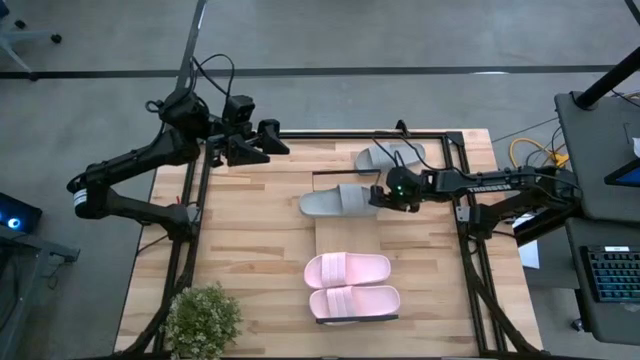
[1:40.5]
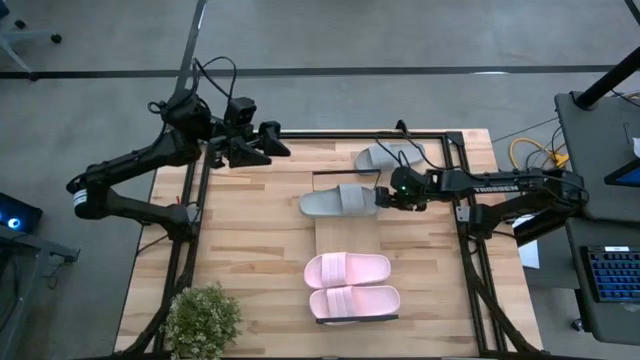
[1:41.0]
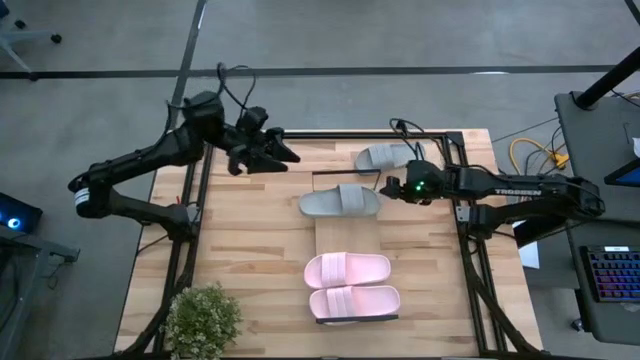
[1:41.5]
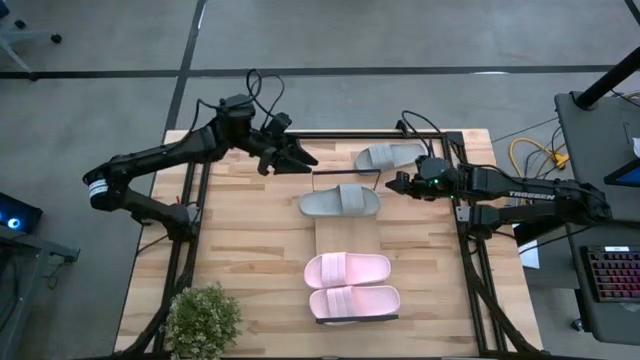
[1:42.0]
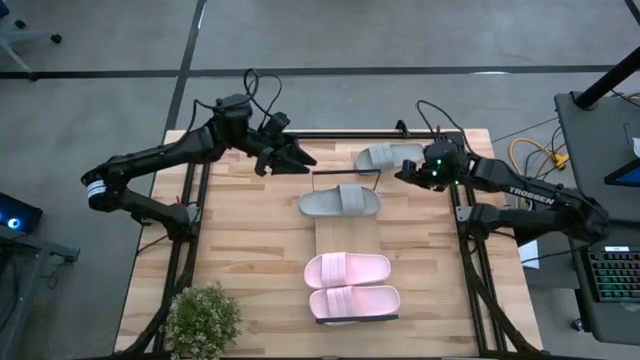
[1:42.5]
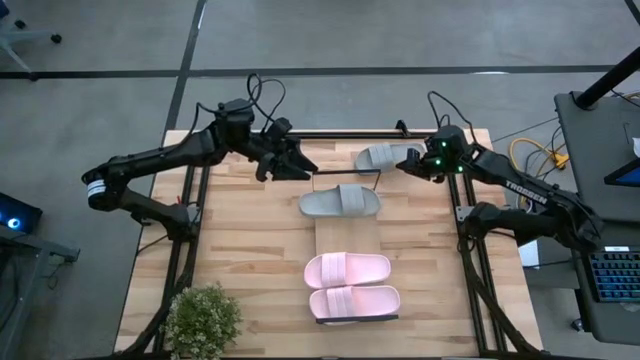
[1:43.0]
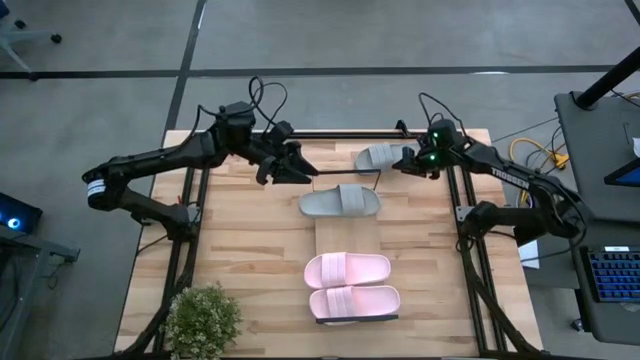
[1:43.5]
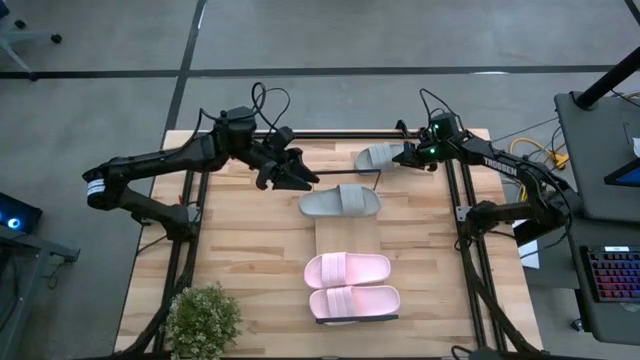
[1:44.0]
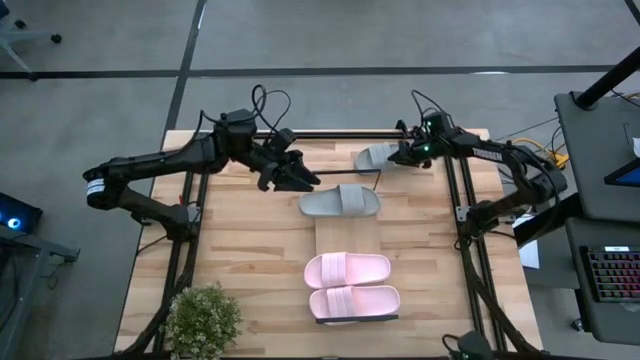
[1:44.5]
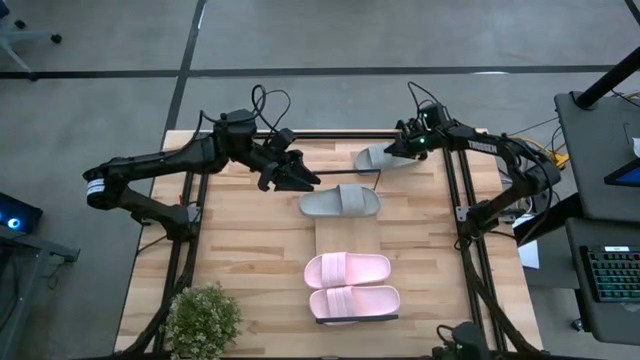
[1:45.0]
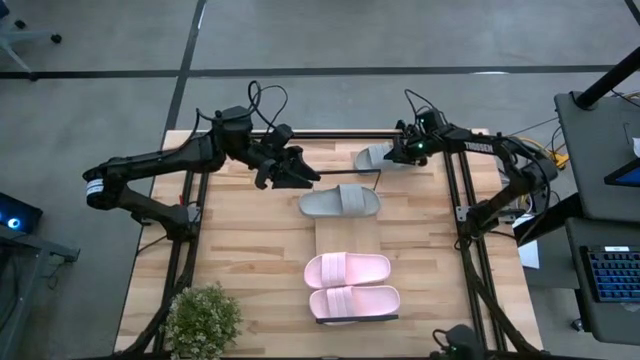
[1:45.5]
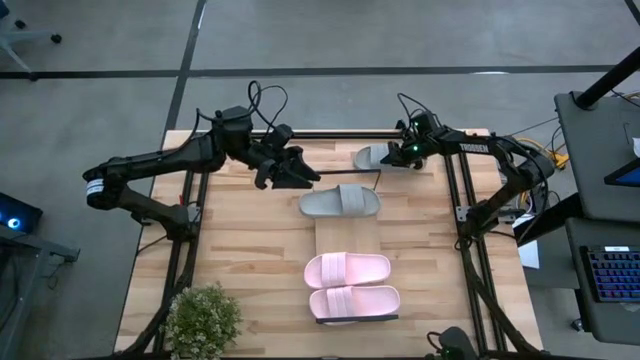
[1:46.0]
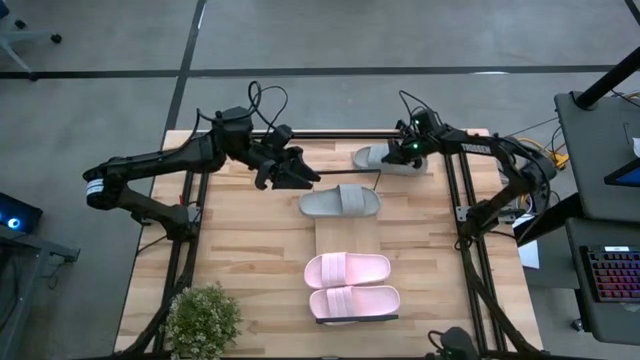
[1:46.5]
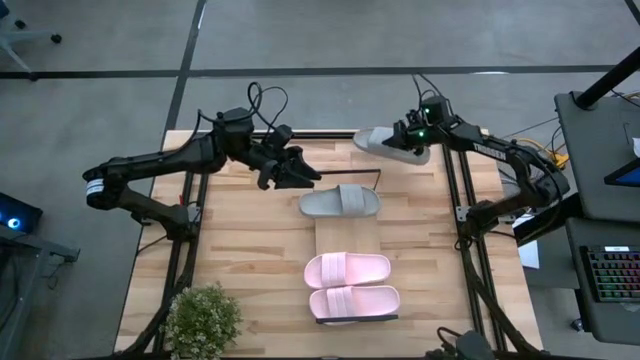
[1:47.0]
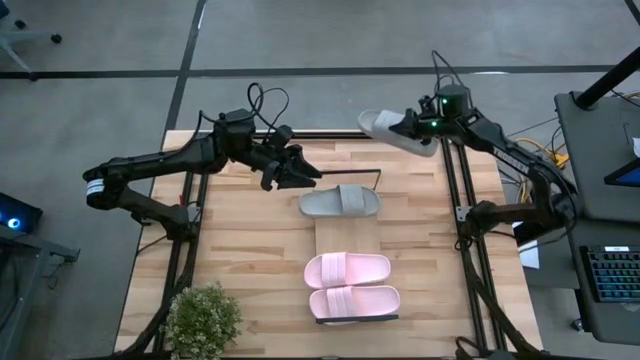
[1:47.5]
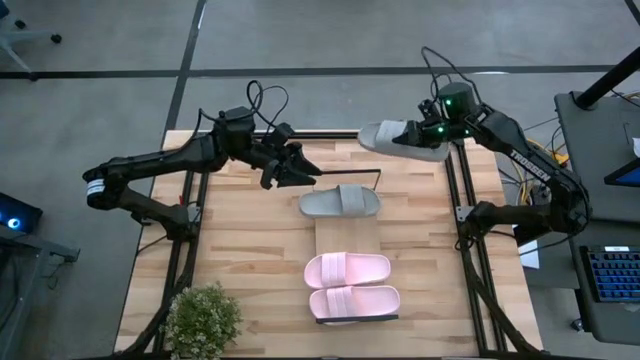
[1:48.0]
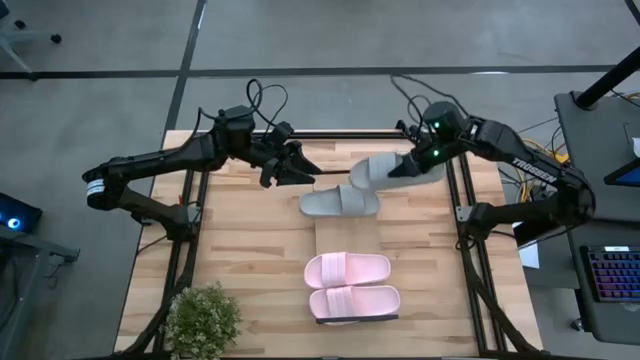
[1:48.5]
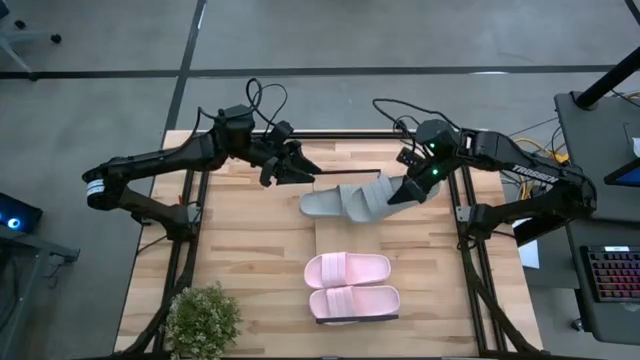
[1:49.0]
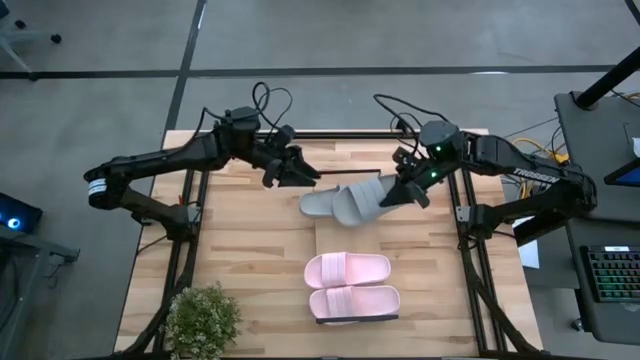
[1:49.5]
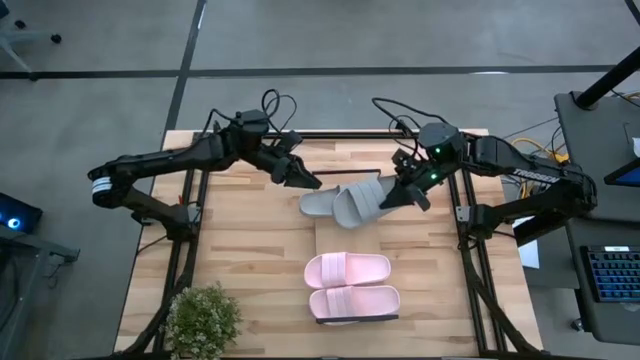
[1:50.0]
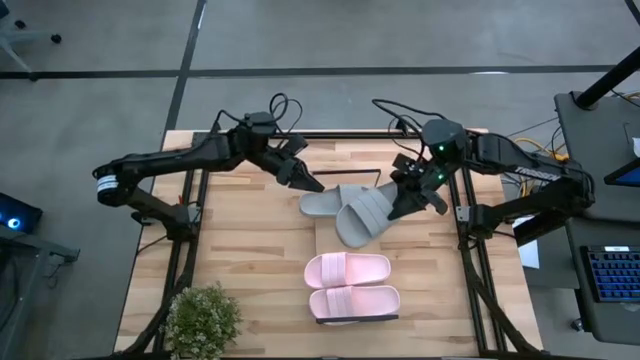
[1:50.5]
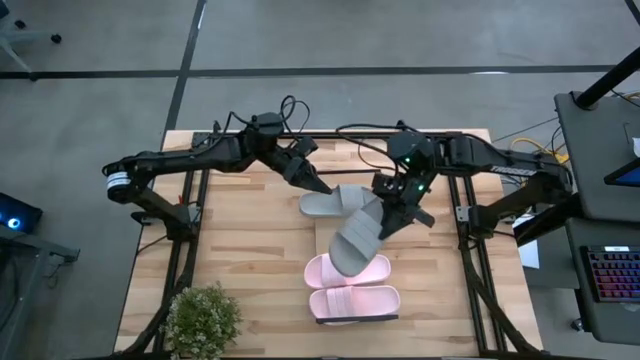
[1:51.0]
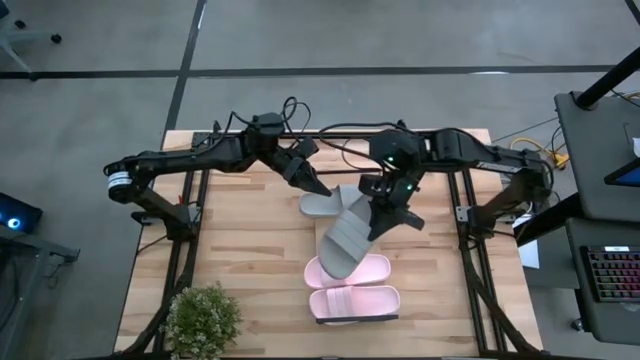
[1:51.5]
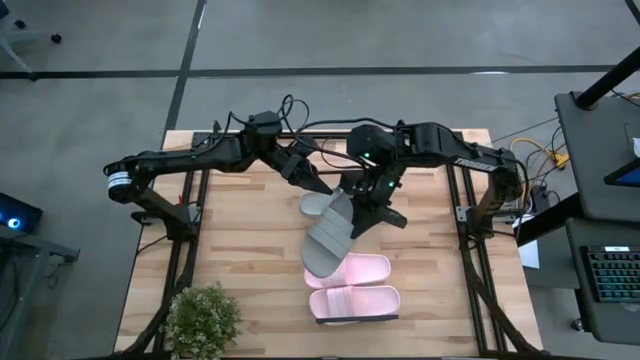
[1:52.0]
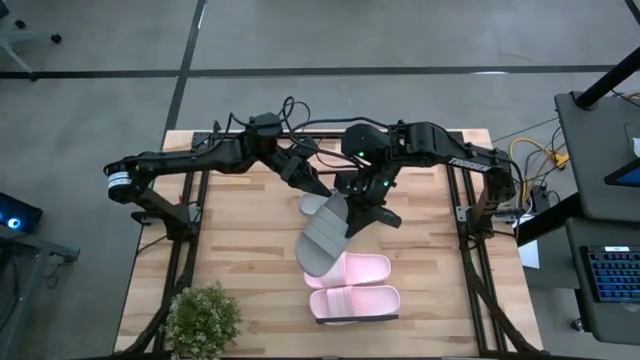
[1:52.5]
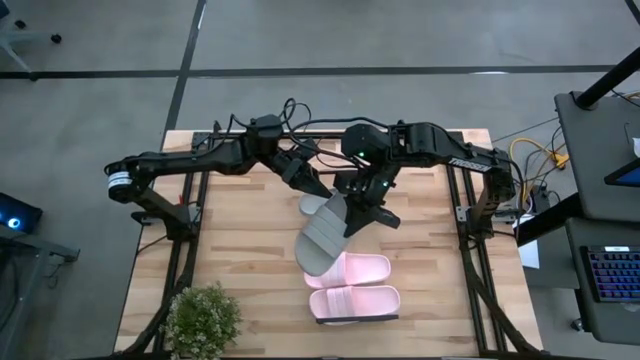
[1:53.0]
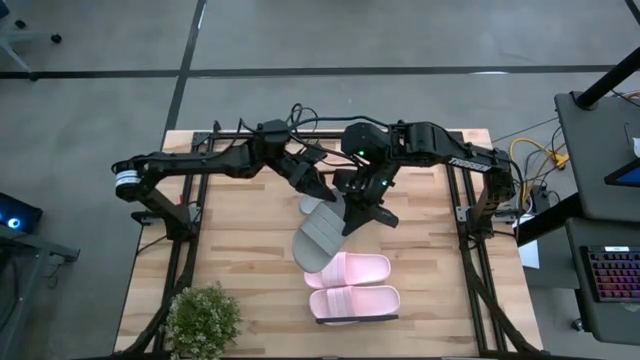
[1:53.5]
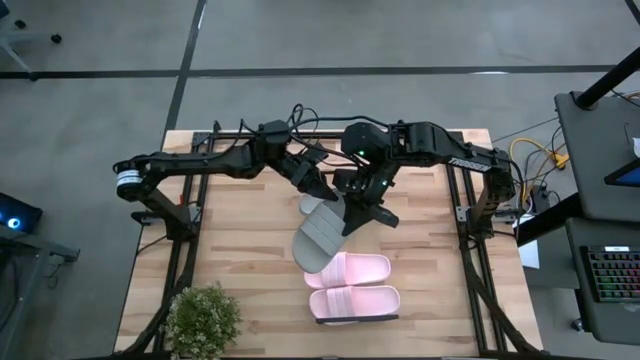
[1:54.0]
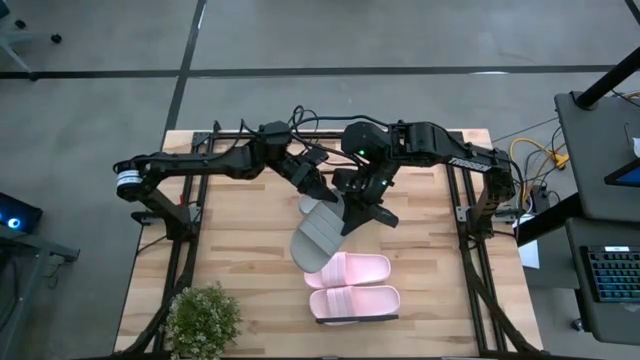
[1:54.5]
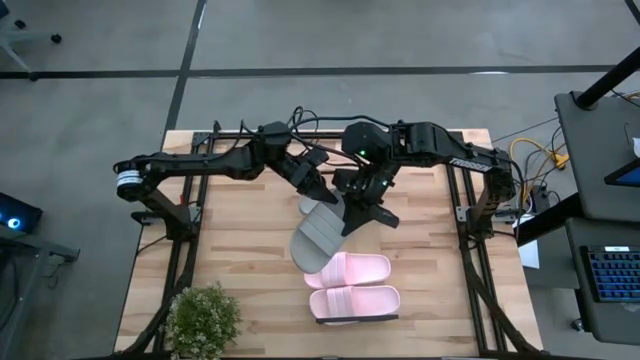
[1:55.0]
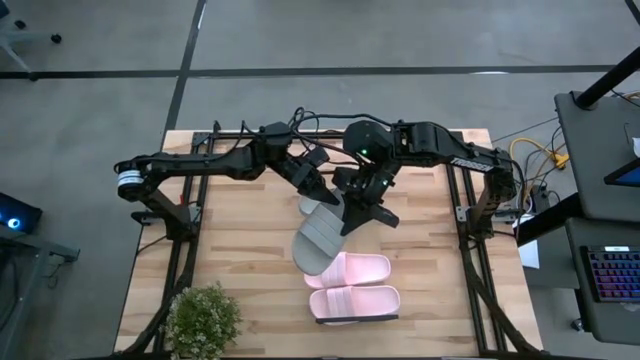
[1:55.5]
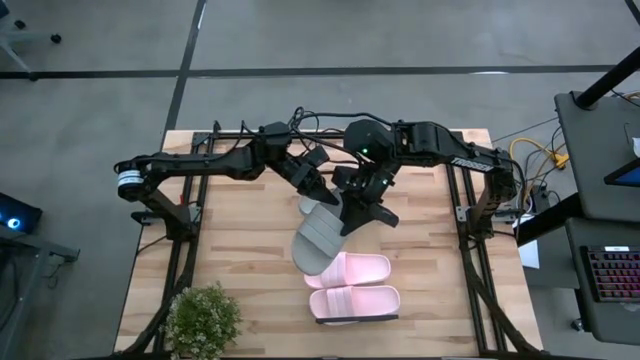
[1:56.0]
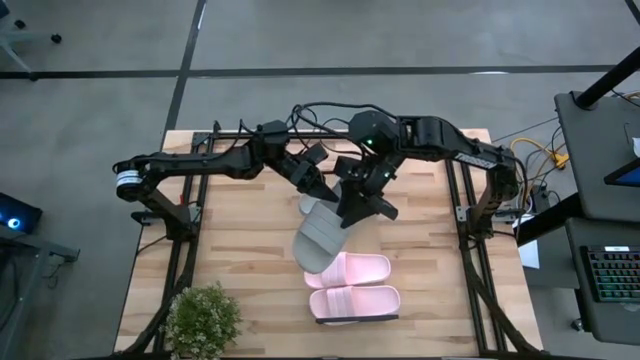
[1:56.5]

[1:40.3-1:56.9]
Task: Pick and place slides into the shelf
Put the gray slide on the shelf

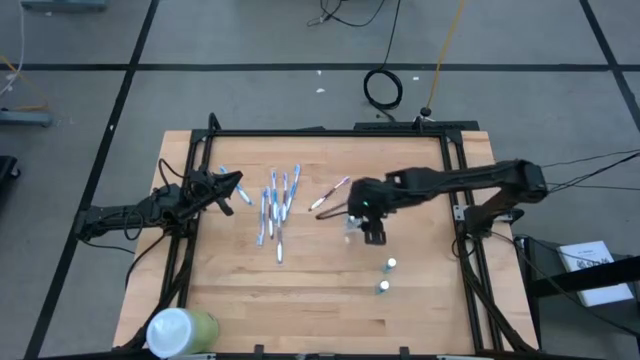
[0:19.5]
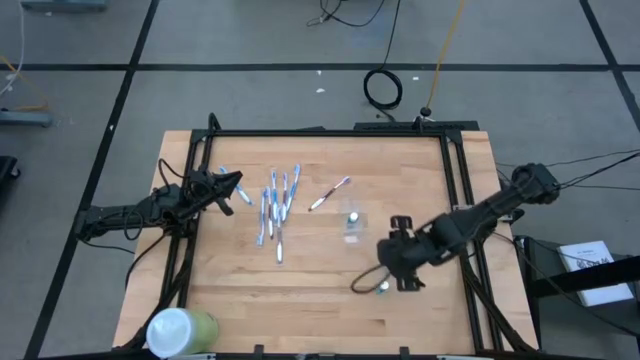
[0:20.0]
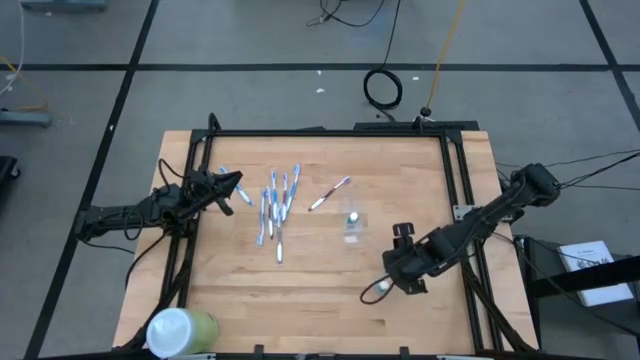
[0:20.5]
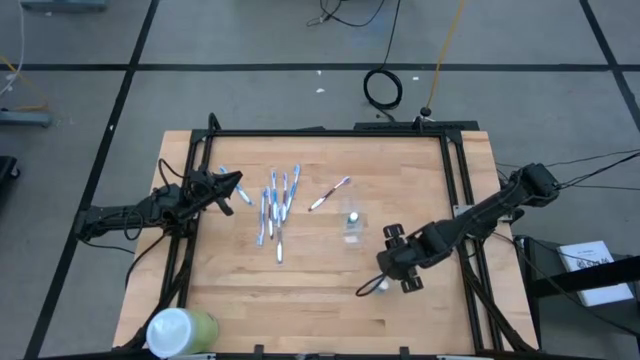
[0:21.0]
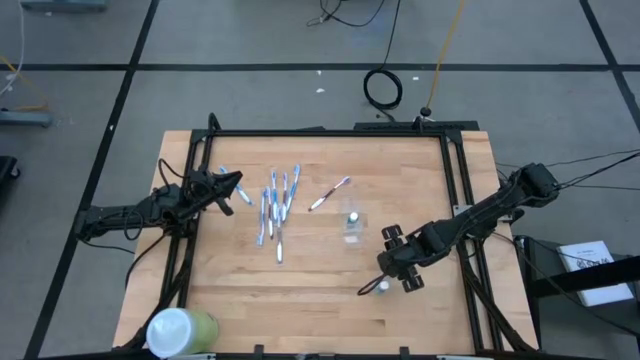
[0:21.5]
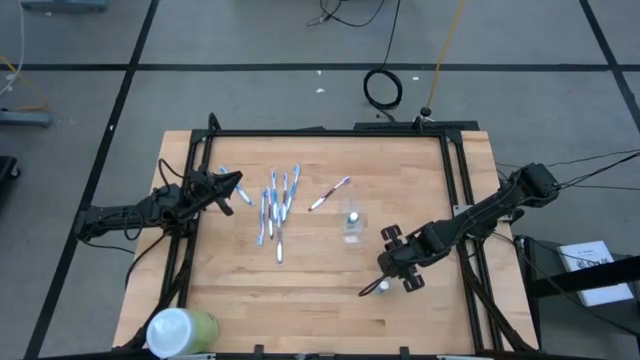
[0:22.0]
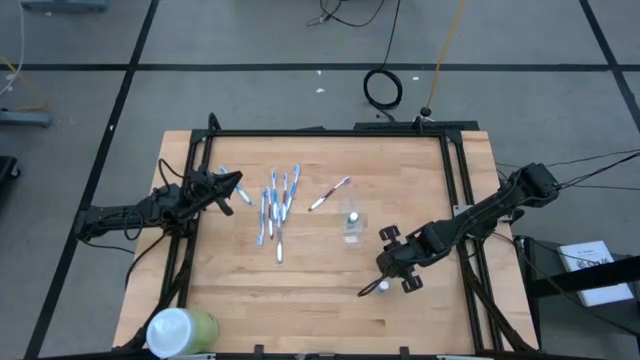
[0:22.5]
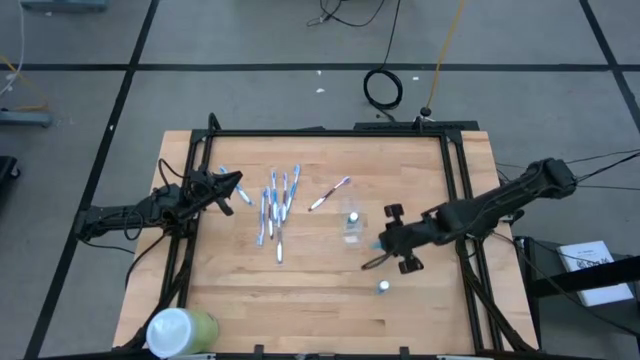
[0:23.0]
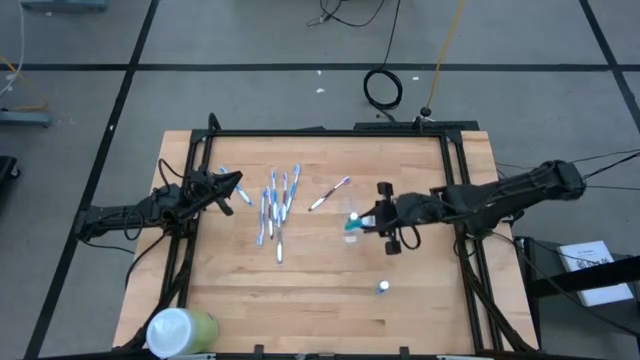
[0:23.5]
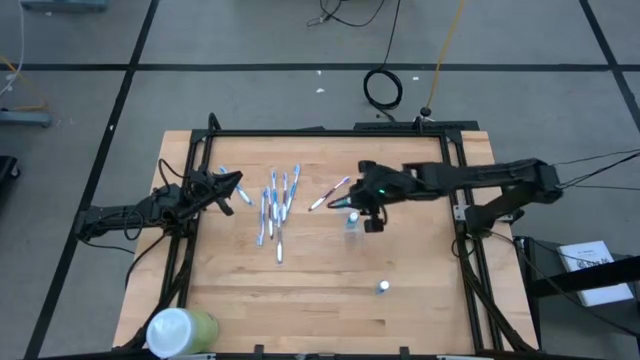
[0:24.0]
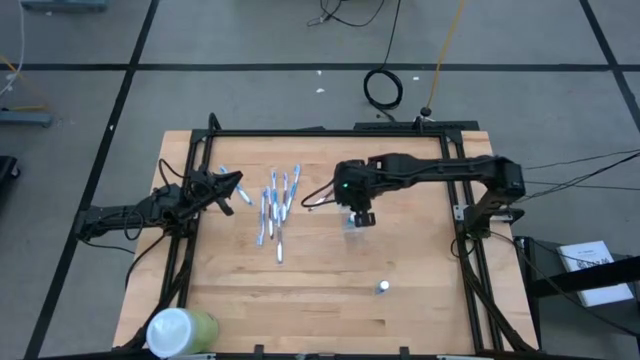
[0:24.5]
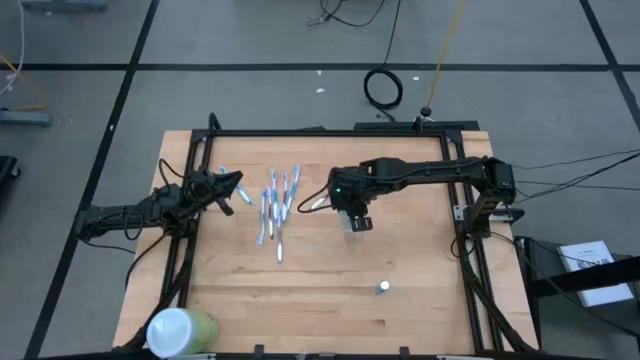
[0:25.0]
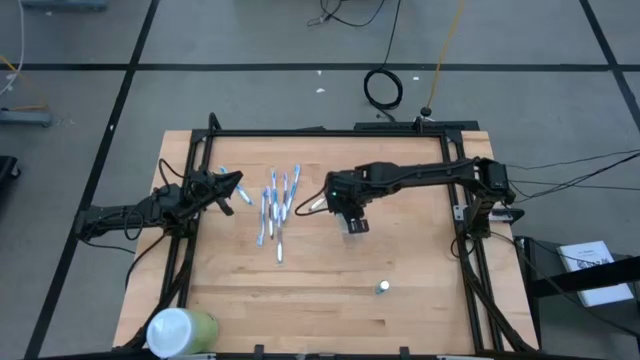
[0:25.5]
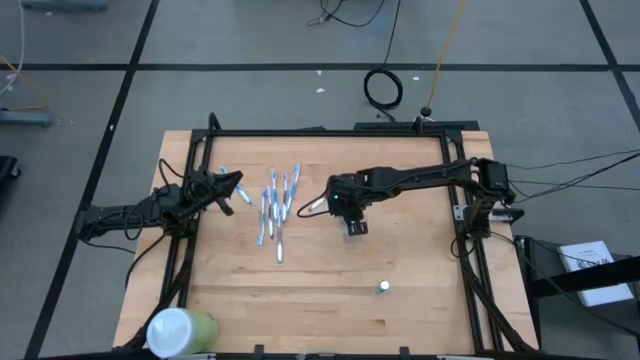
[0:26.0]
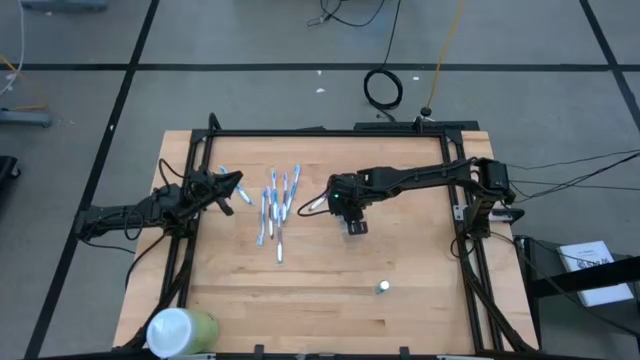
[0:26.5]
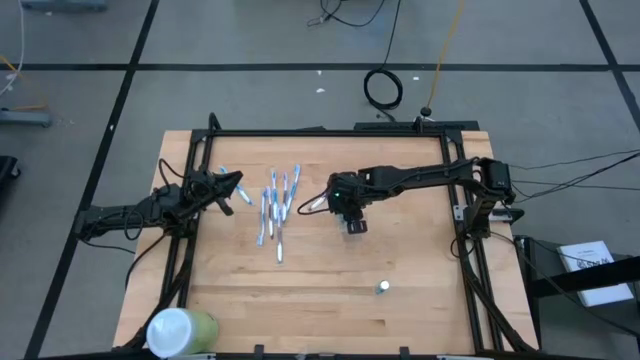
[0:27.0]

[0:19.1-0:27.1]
Task: Pick & Place toothbrushing station
Put the blue mouthwash into the transparent organizer
